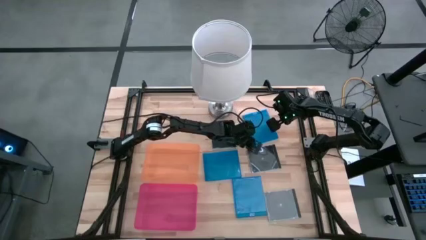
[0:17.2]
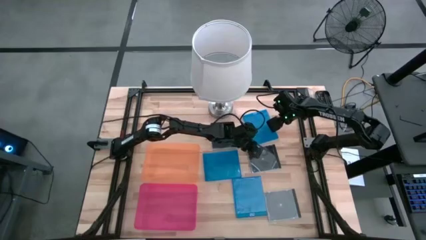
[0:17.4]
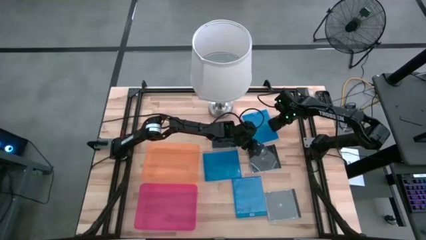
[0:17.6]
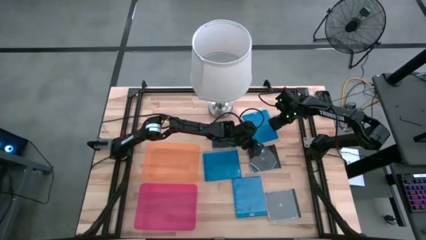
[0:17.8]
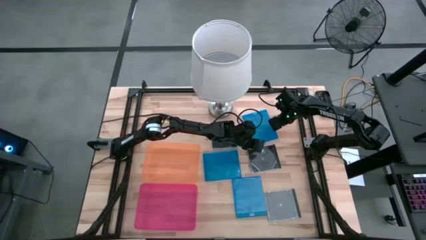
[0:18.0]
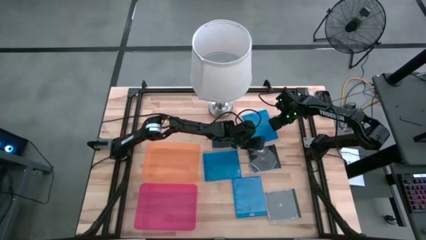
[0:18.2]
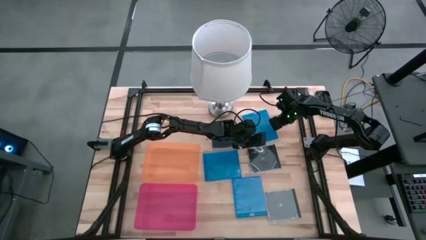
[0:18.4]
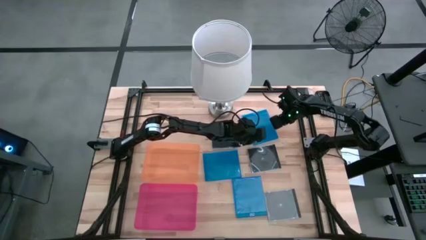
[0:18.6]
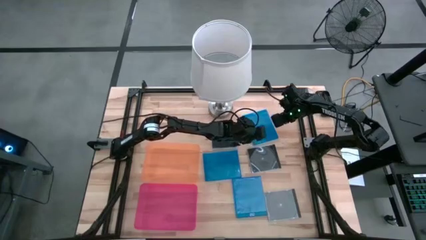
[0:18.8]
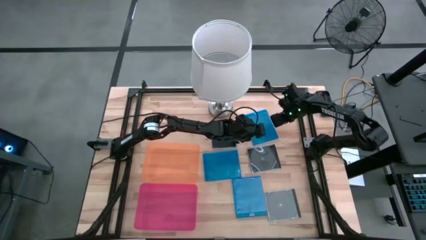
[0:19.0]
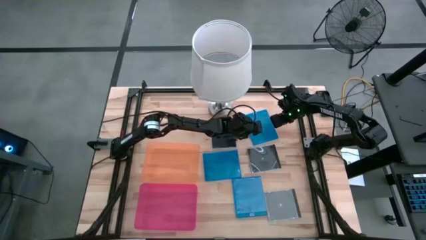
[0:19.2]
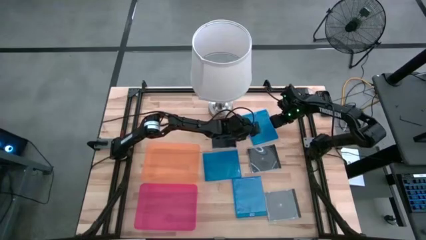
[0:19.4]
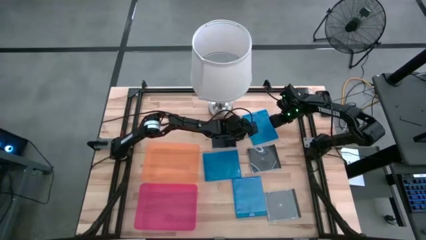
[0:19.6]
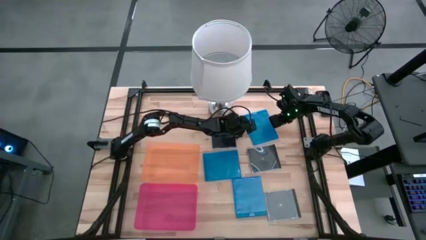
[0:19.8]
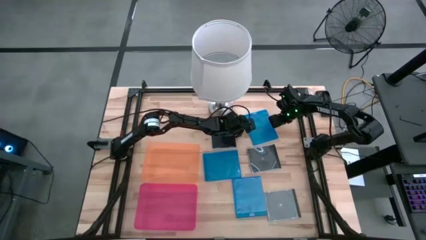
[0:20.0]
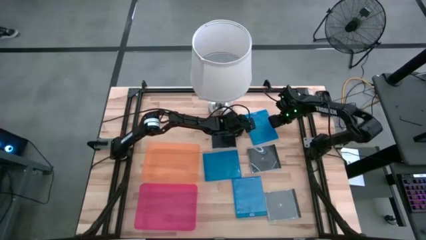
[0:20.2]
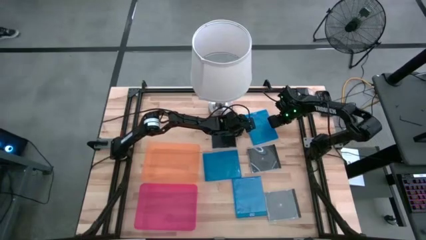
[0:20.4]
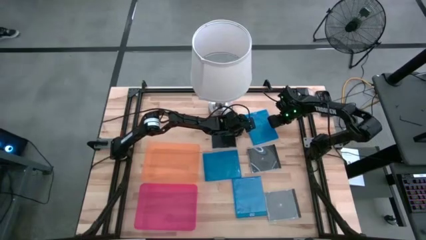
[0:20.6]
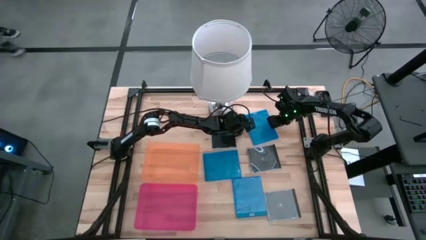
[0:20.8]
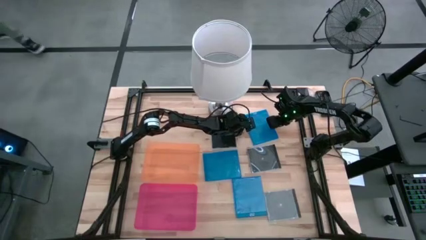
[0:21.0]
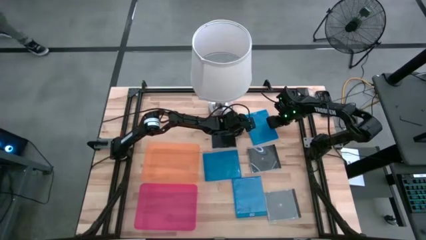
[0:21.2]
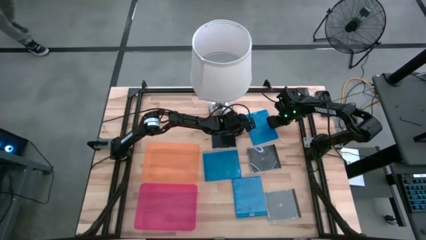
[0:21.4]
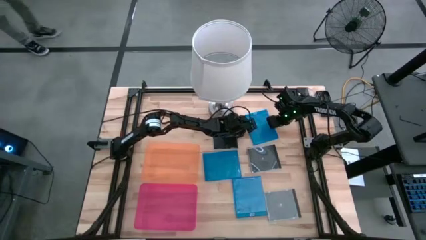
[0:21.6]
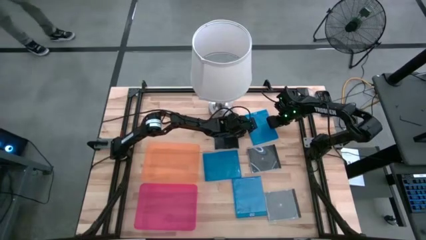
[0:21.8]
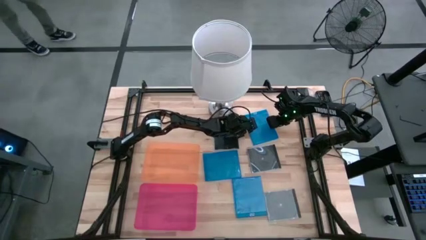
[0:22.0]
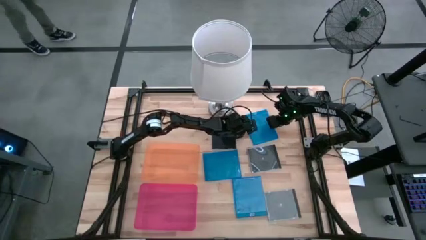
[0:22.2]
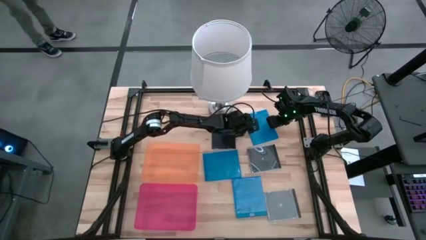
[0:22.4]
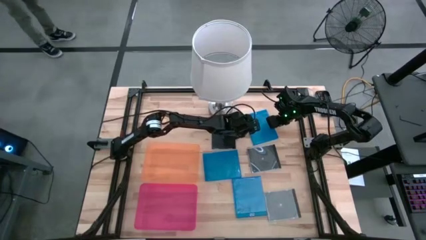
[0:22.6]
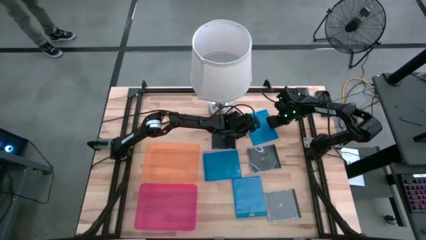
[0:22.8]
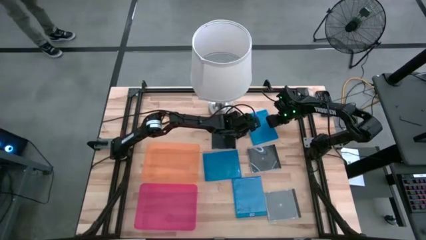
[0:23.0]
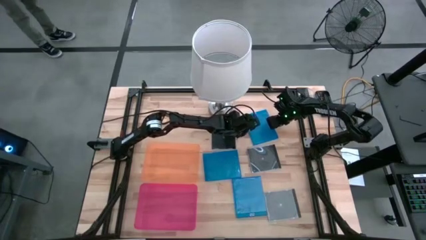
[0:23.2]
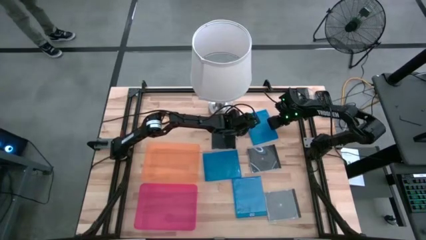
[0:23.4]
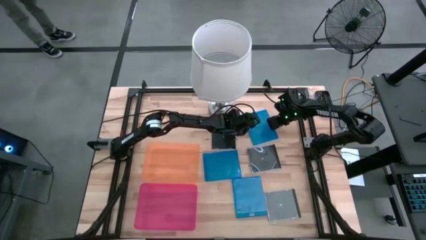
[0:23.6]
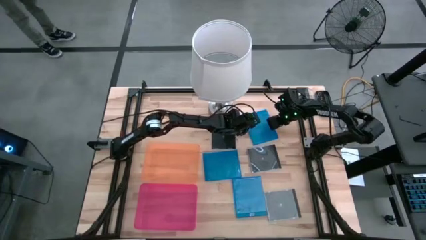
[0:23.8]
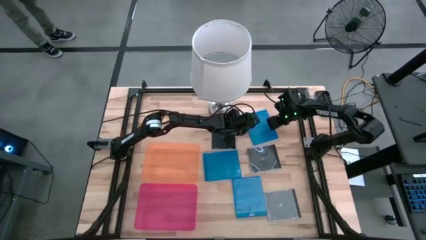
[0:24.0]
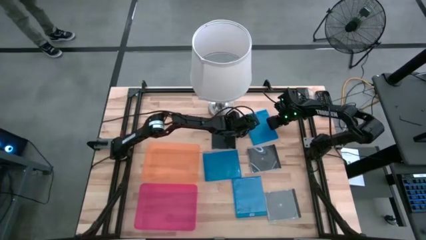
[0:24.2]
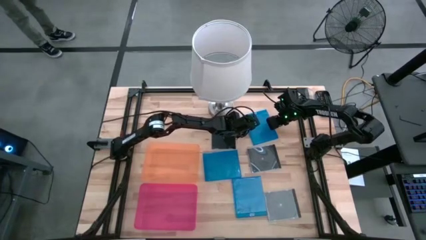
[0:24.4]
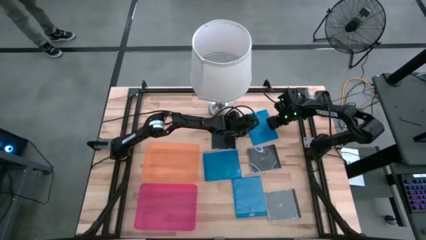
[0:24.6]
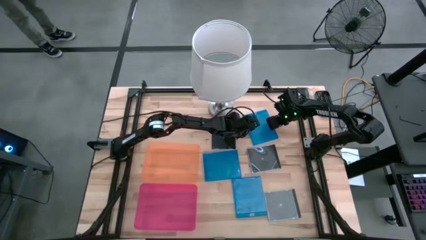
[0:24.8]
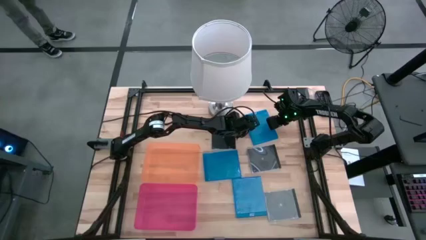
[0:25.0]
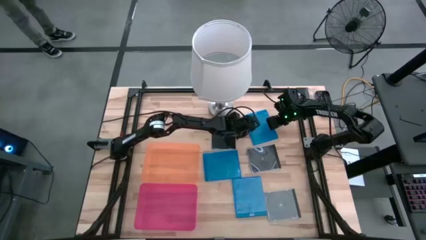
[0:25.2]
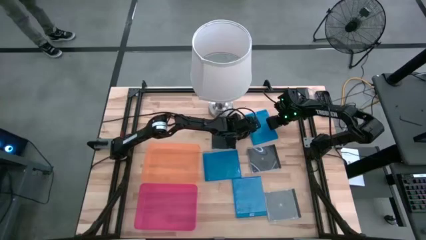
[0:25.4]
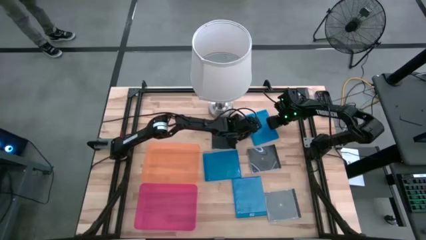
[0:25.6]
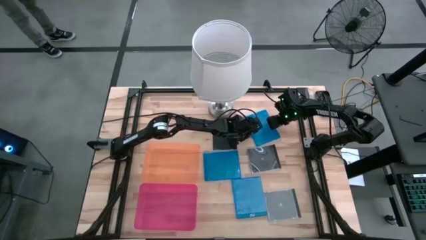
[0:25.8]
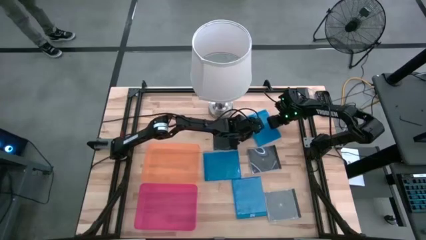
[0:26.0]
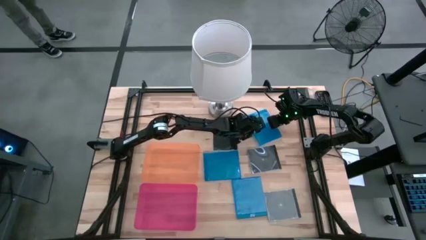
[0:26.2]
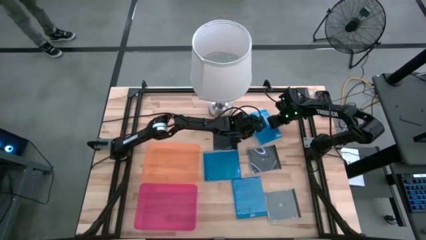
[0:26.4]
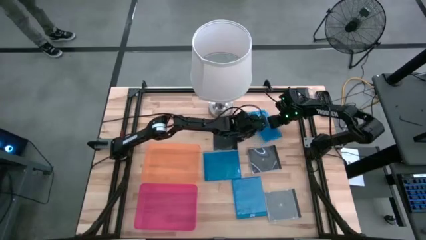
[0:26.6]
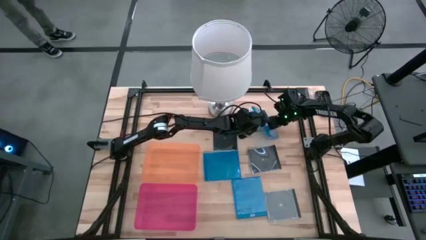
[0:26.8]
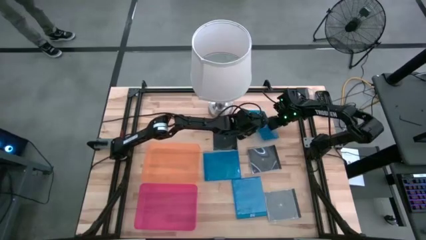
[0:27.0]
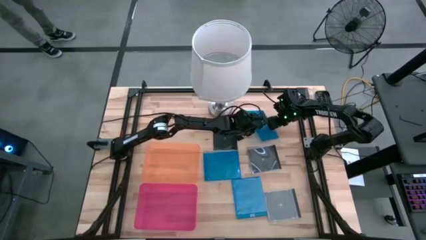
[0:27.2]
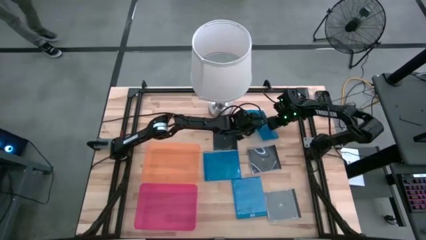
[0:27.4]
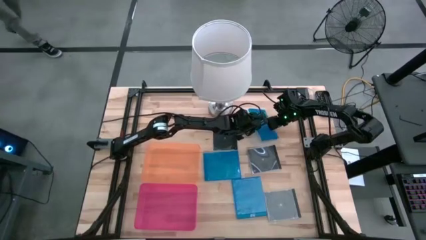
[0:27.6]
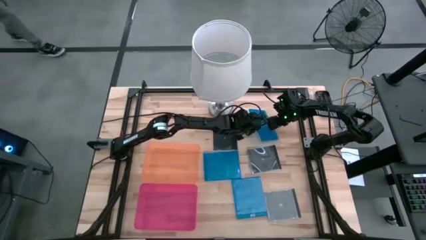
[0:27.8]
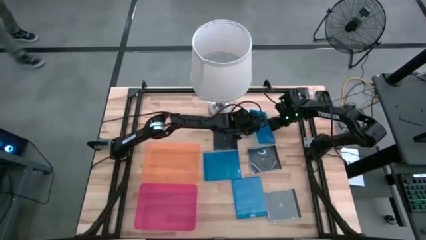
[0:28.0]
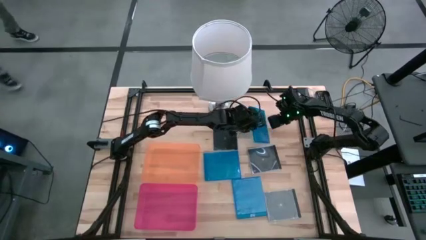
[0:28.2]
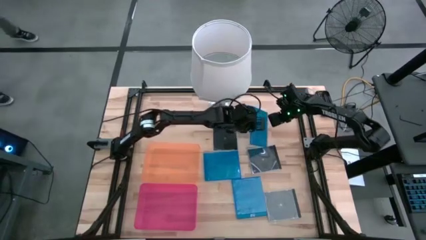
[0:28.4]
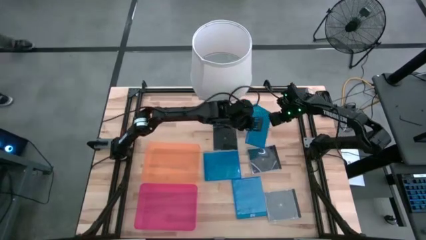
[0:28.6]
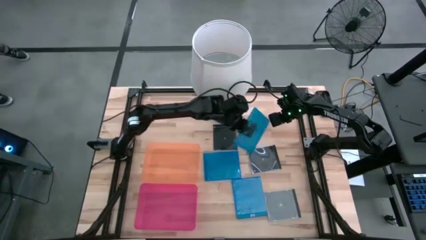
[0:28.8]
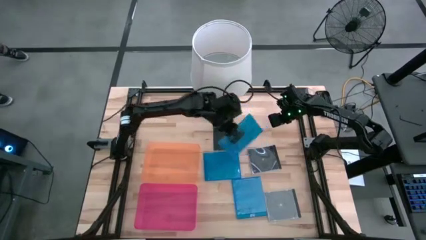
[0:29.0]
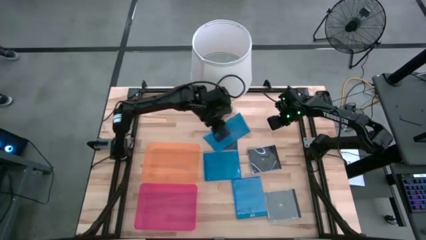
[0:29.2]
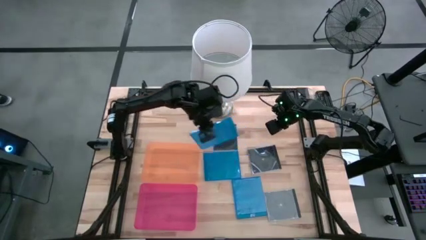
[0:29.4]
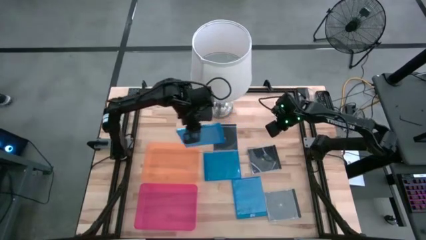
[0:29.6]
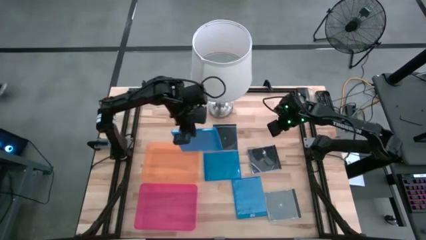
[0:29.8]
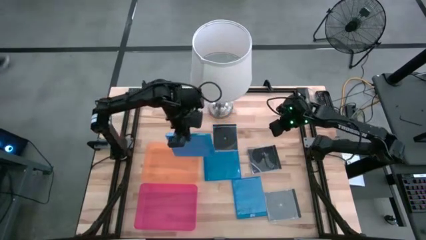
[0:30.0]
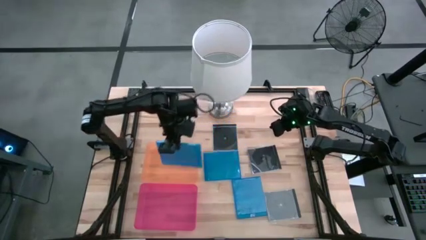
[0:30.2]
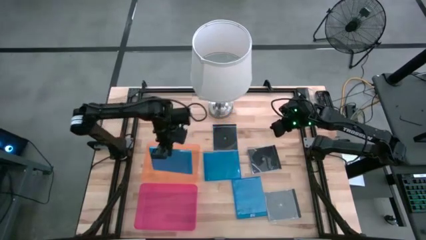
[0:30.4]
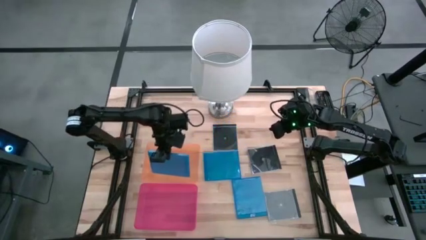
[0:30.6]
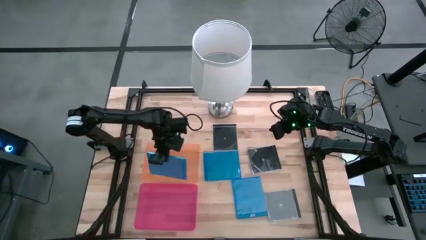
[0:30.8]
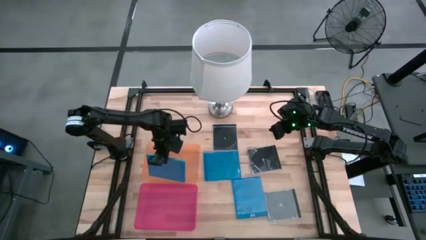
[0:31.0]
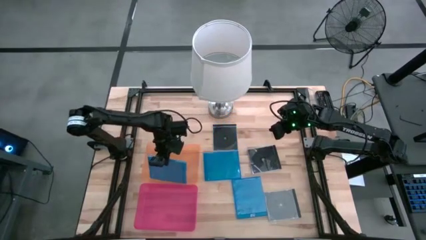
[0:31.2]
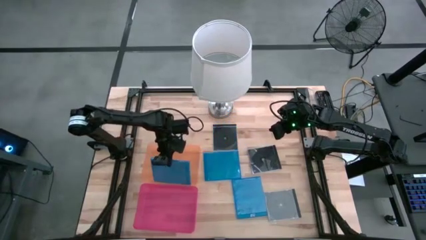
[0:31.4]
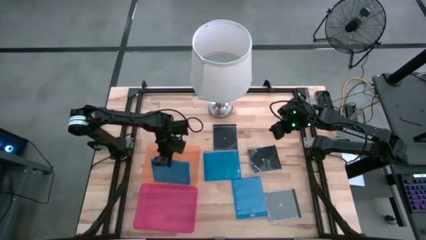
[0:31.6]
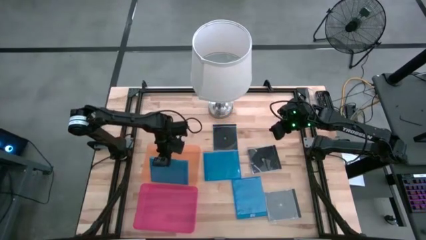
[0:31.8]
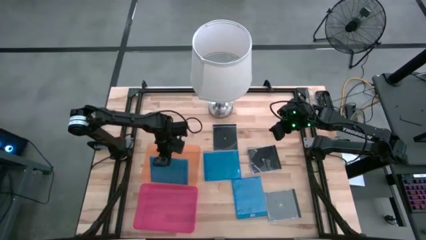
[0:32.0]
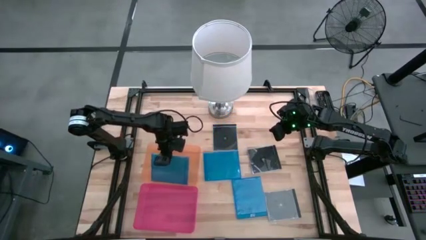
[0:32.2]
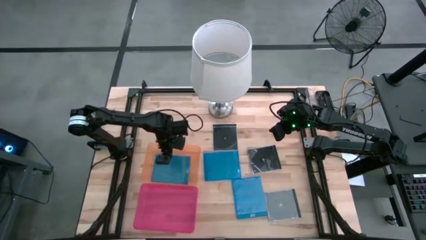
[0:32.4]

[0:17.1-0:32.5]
Task: Pick & place jewel cases by type
Put the top blue CD case into the orange bin
